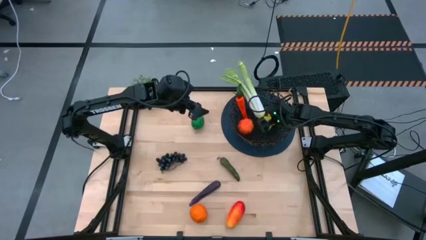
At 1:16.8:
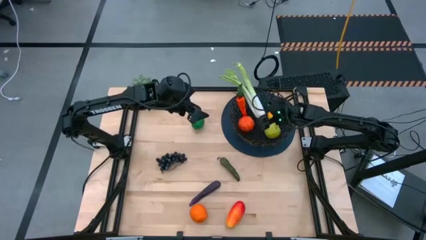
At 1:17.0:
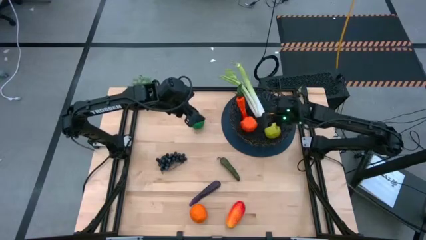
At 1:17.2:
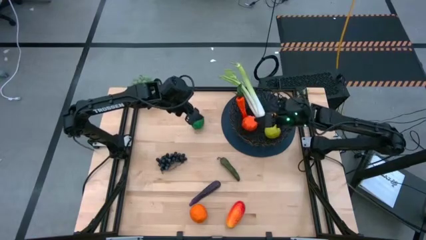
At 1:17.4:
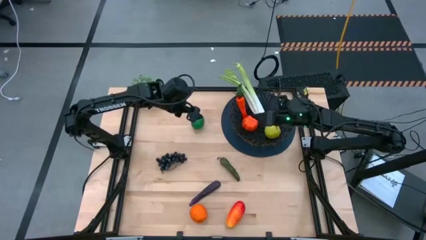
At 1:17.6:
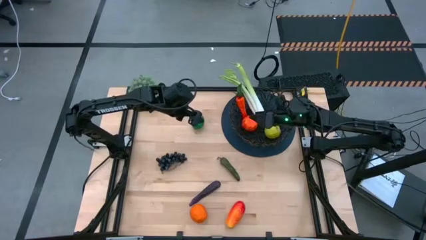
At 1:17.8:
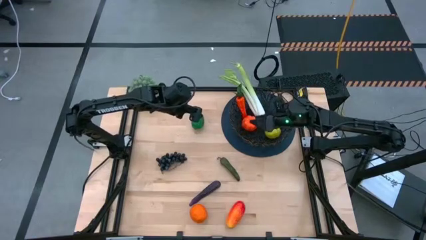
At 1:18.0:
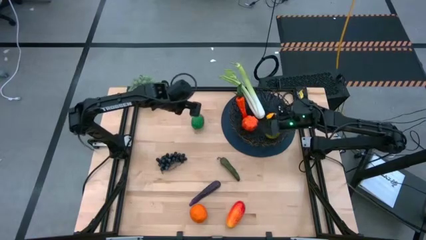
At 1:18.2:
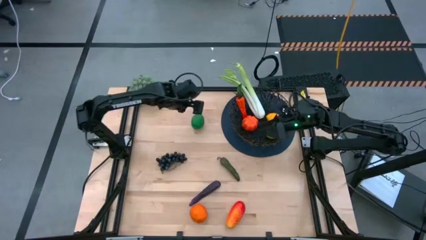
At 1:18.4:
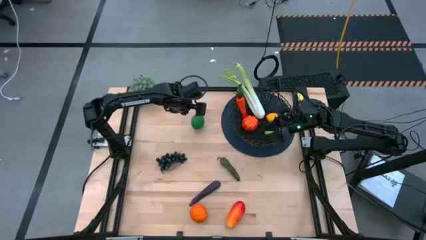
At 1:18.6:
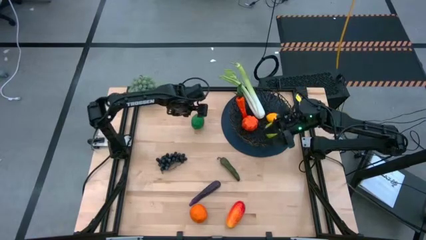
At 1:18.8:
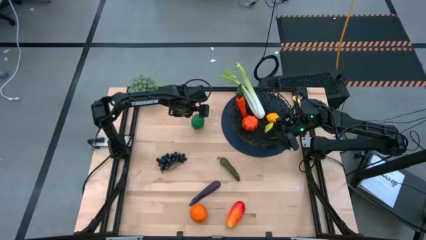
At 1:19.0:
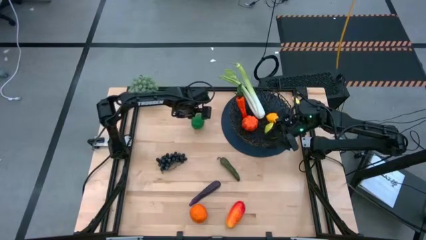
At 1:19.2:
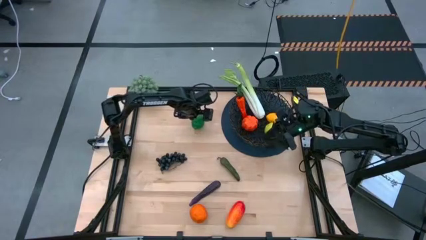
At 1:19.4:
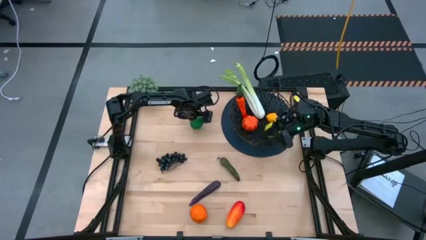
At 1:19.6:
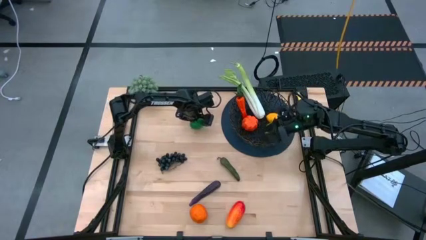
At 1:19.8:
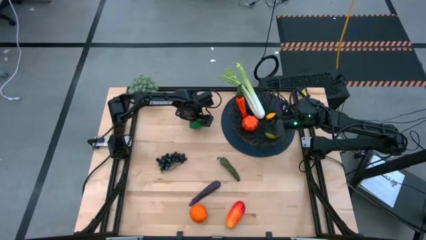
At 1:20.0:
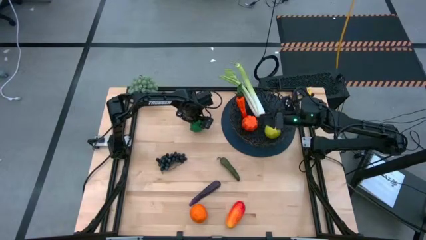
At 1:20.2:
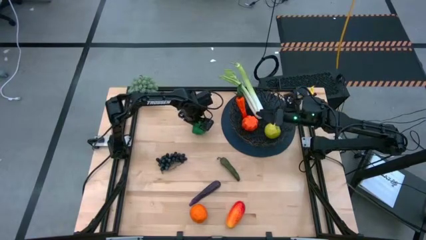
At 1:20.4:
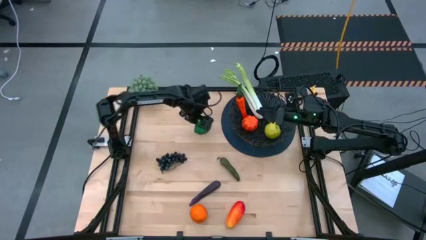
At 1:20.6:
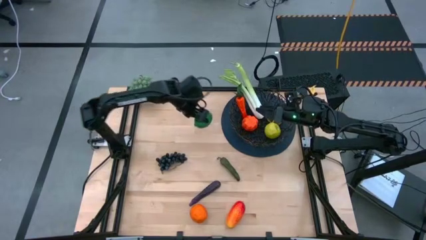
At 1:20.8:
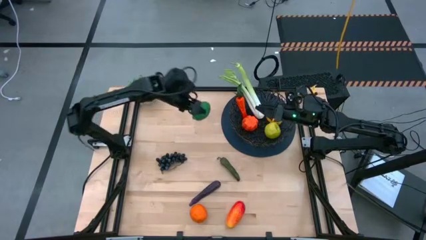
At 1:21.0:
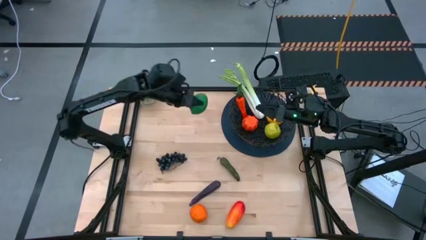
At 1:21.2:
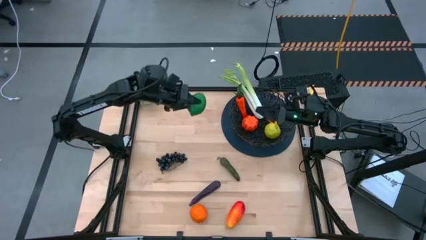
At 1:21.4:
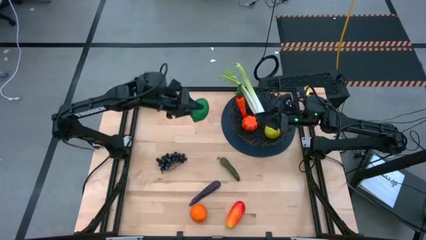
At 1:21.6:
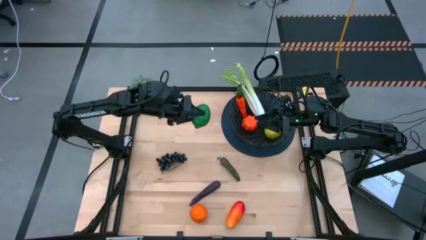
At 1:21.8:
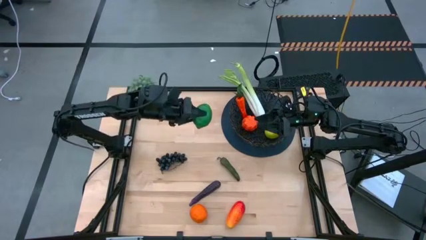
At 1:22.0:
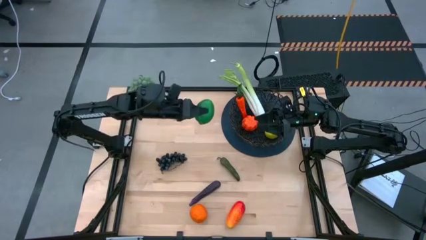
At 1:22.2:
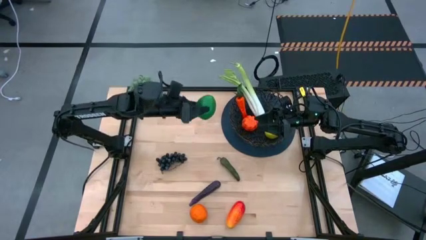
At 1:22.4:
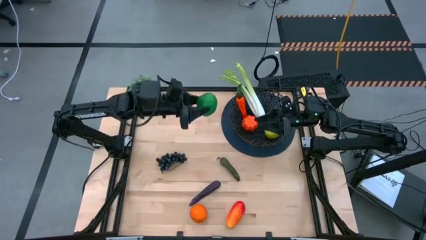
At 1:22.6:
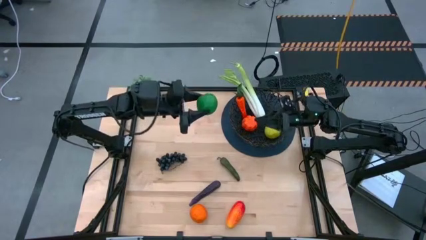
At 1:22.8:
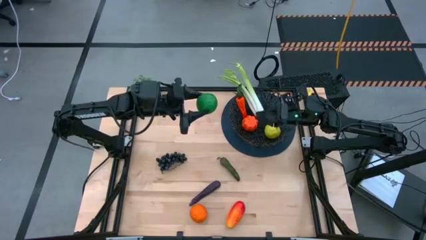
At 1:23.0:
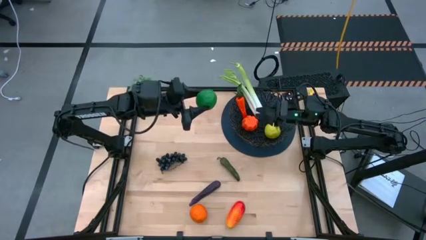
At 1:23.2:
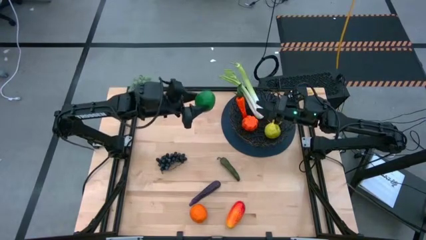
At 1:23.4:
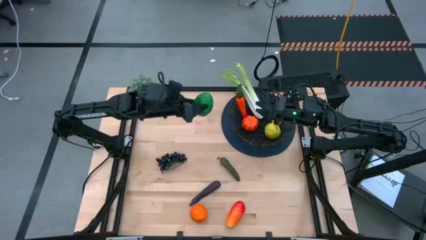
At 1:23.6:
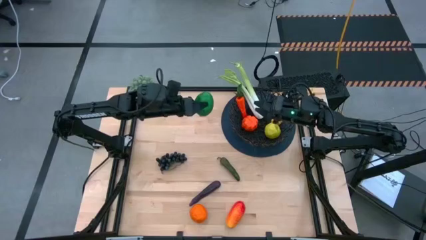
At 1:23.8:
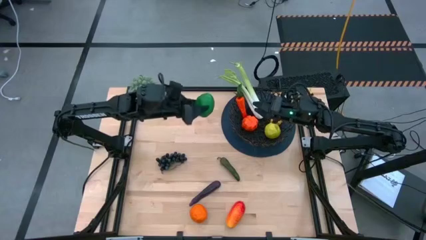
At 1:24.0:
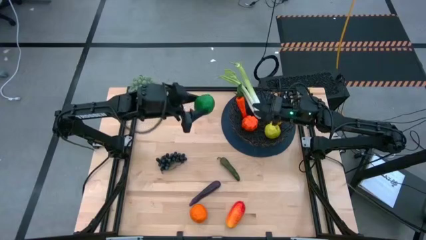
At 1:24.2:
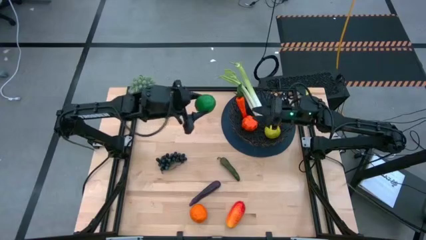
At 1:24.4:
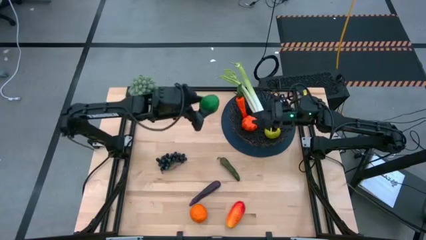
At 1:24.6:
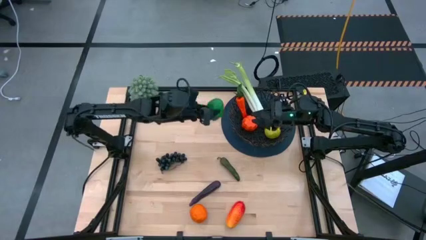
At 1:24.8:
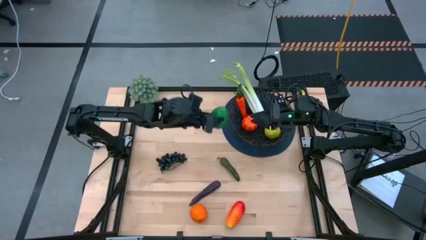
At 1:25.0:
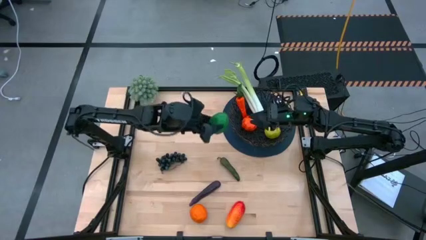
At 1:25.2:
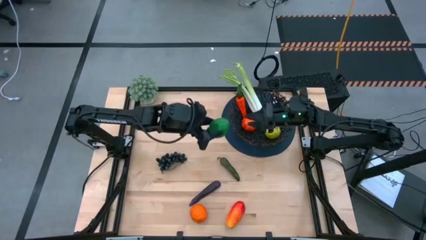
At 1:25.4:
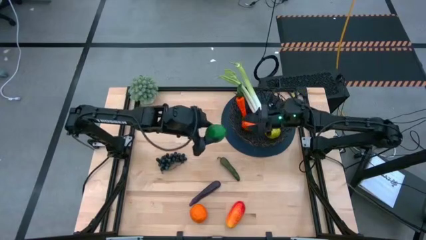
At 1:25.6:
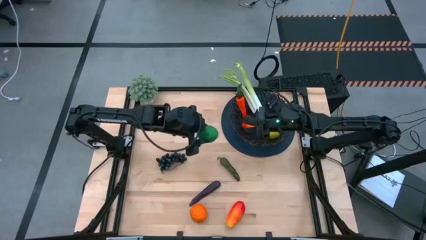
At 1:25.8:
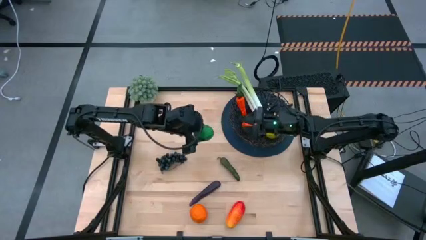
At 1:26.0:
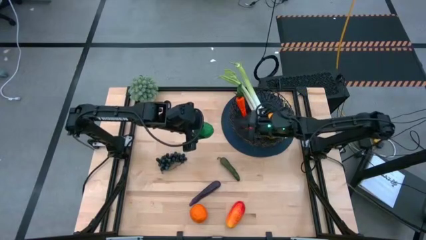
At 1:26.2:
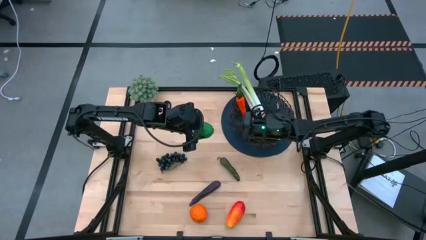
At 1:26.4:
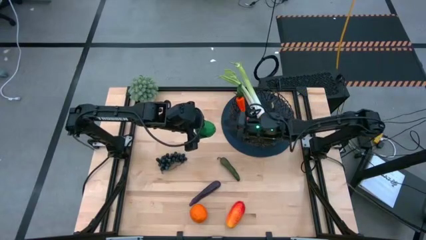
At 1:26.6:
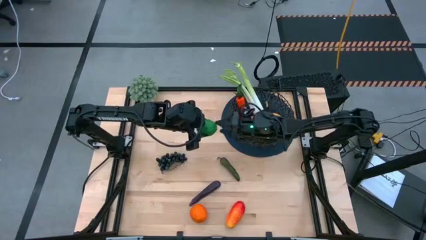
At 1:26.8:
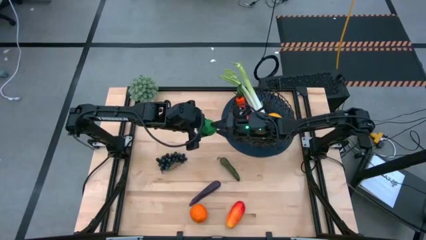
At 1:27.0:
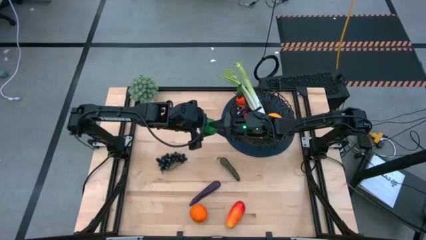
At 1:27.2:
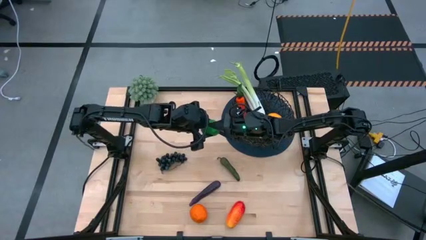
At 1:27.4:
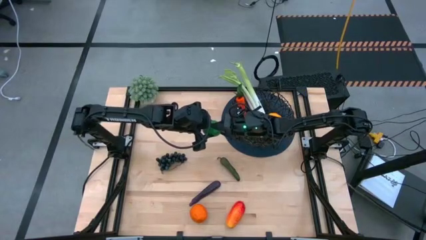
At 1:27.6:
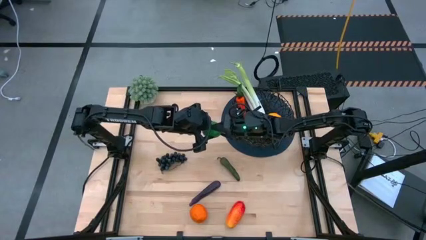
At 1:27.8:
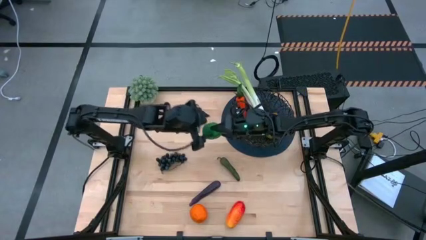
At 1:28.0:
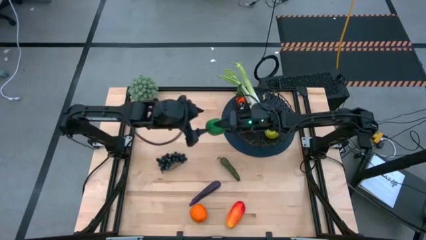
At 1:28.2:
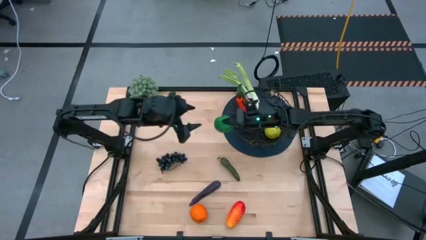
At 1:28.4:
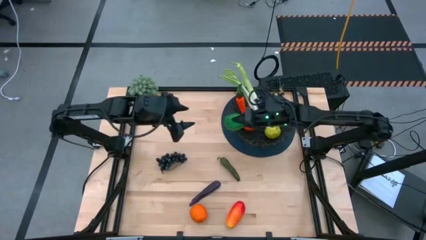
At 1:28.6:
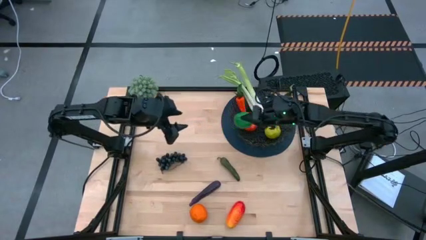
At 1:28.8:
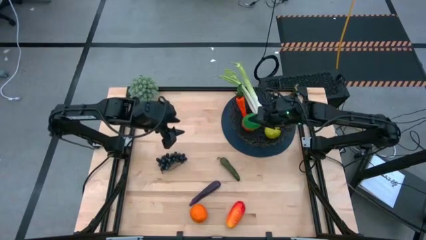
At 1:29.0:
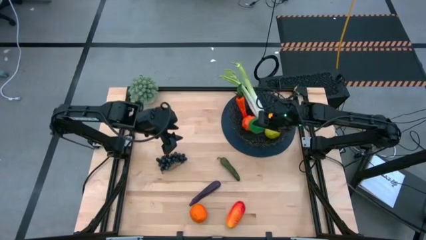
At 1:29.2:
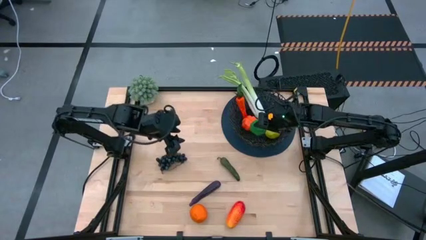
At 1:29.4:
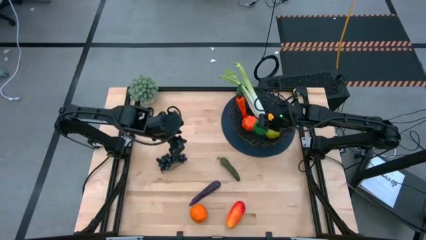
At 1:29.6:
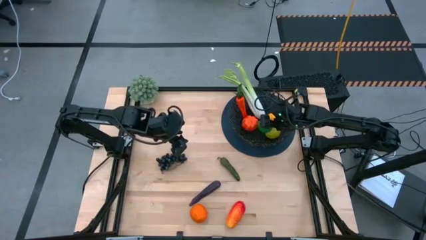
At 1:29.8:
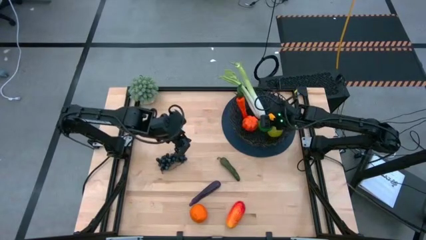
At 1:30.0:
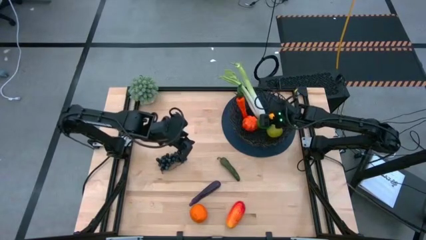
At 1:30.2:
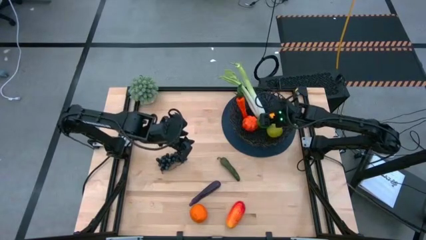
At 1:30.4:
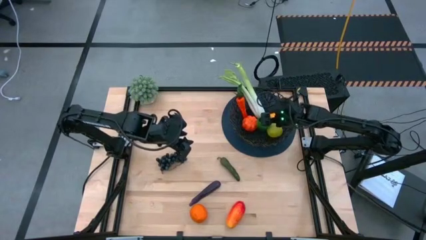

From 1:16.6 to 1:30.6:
Task: Build produce basket
Put the green lime into the black woven basket
